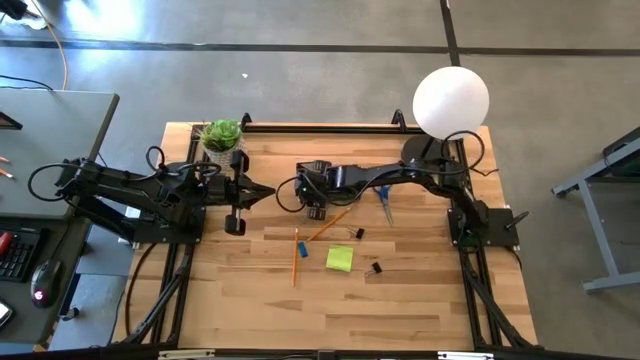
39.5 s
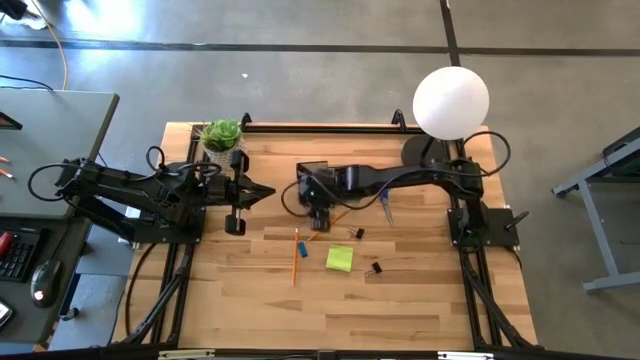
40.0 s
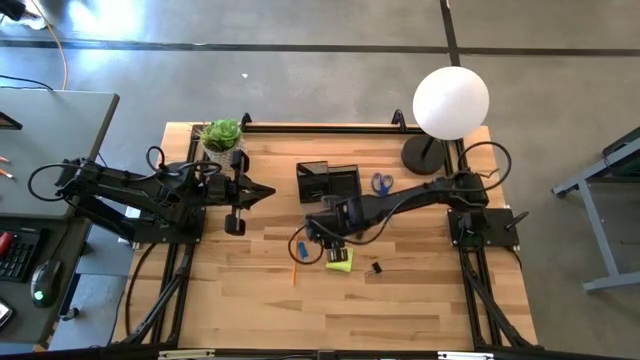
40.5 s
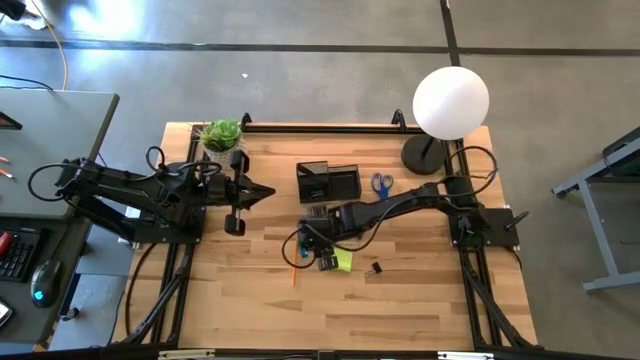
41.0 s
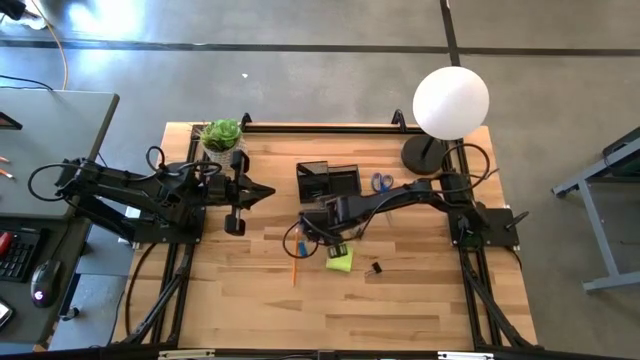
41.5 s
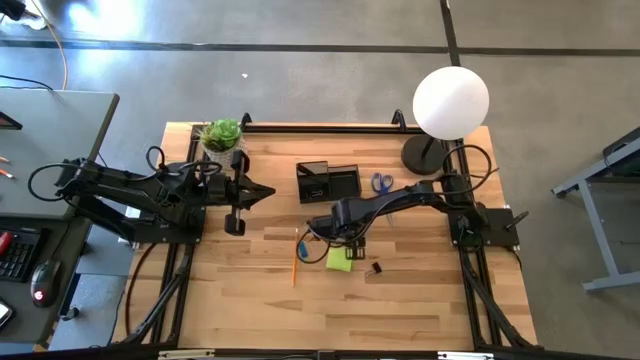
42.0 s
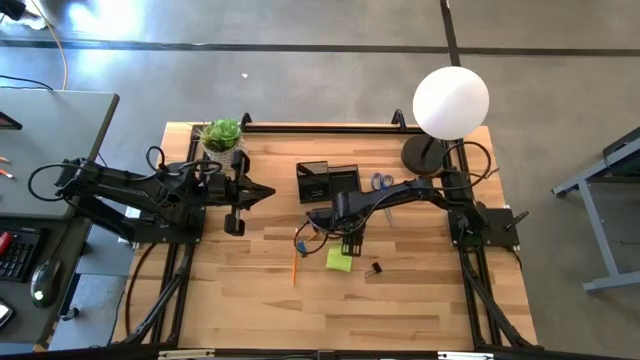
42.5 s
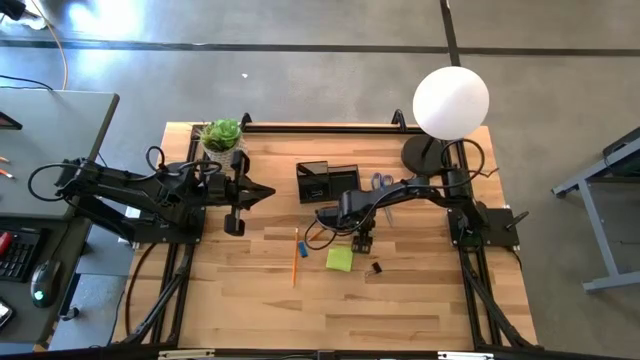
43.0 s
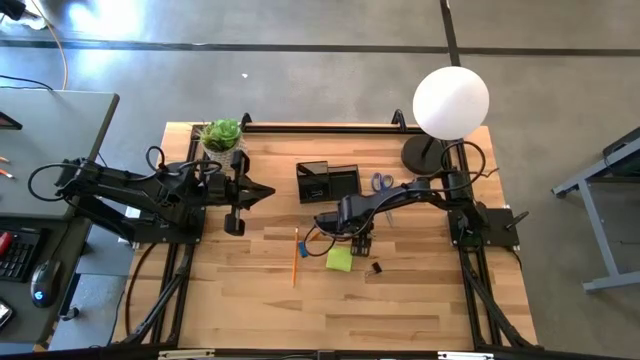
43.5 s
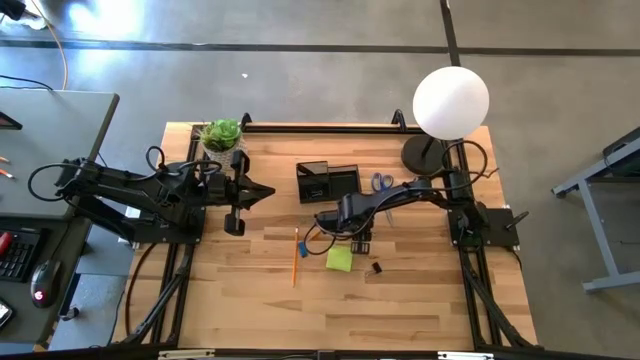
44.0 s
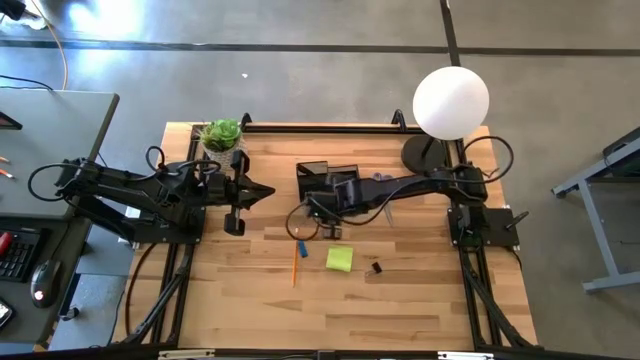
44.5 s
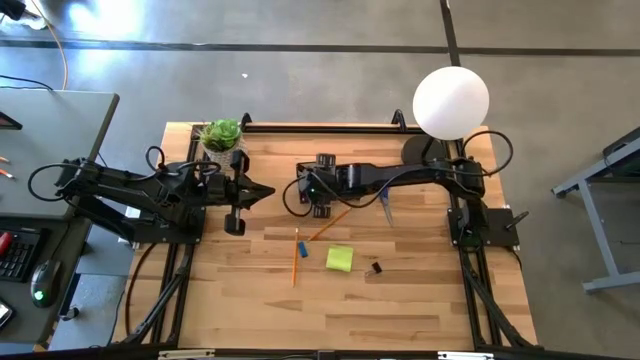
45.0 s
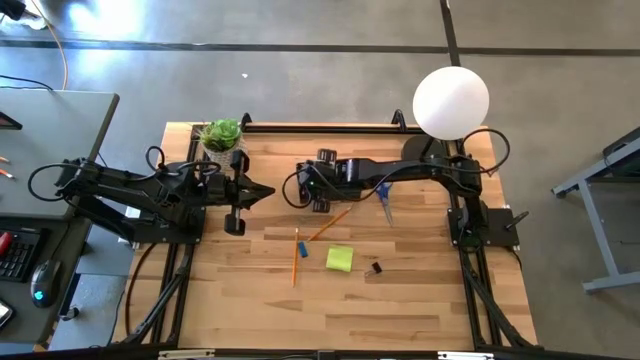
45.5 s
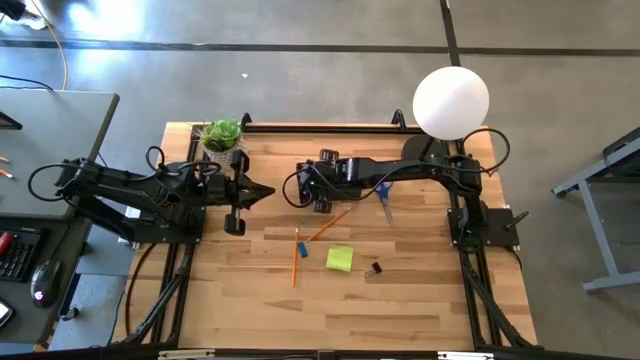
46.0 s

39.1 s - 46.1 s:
Task: Pick and place office supplies into organizer
Put the black binder clip into the black desk organizer

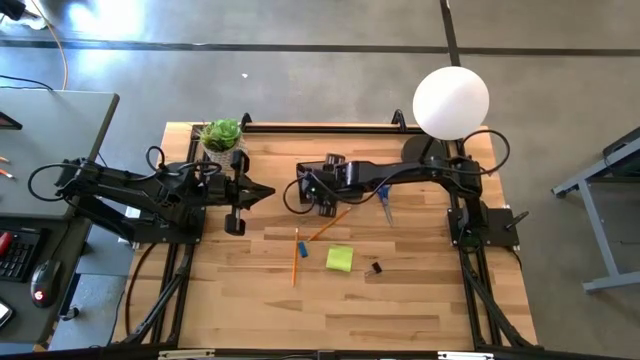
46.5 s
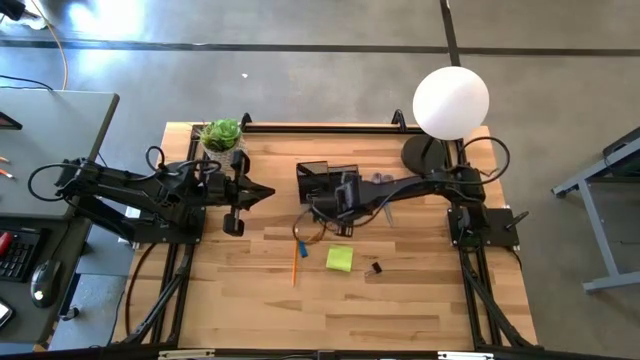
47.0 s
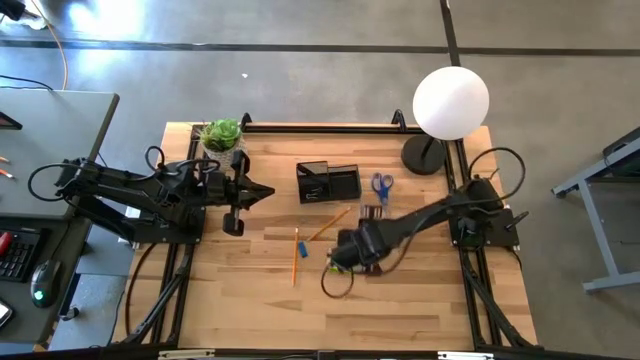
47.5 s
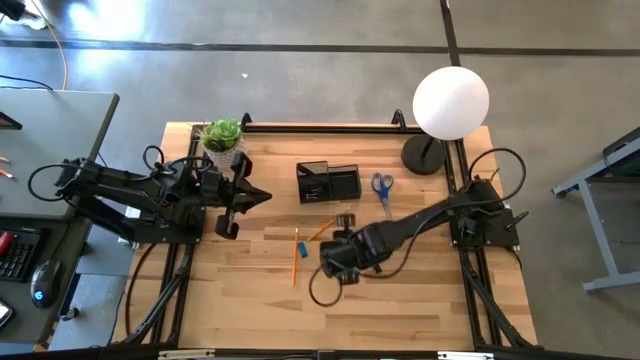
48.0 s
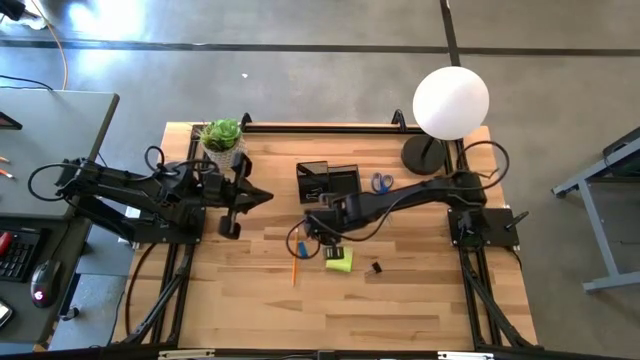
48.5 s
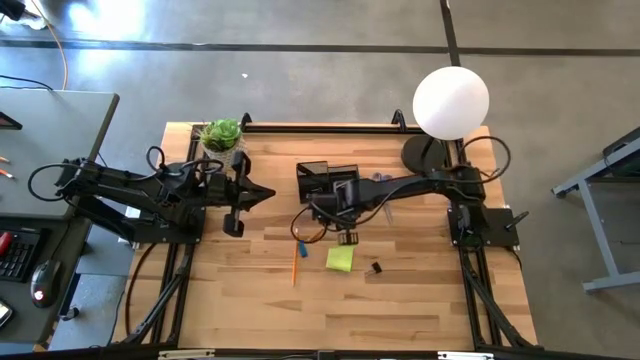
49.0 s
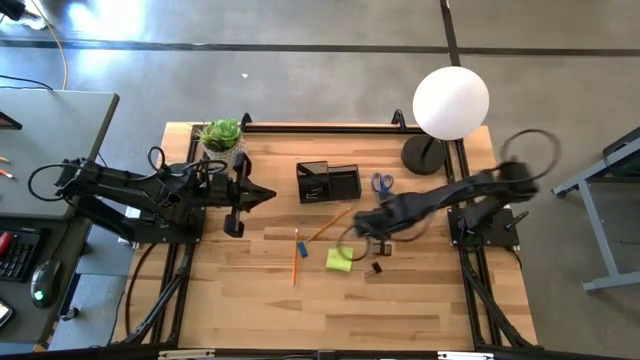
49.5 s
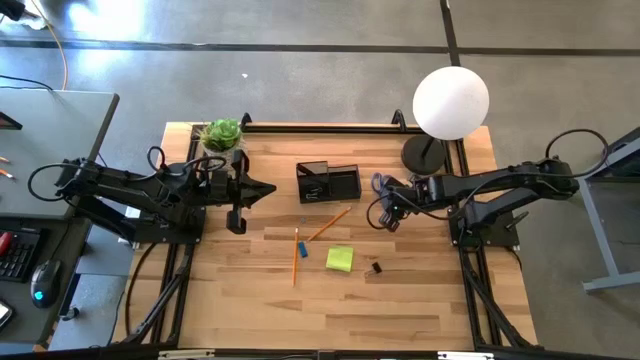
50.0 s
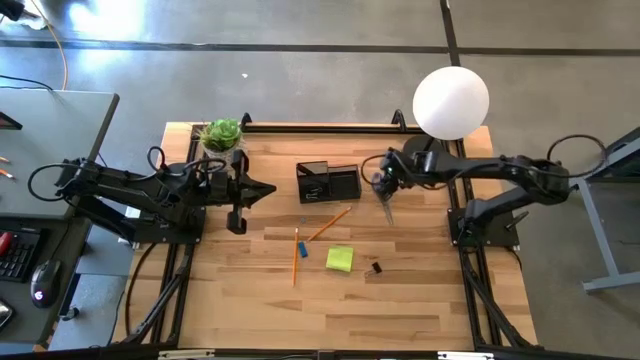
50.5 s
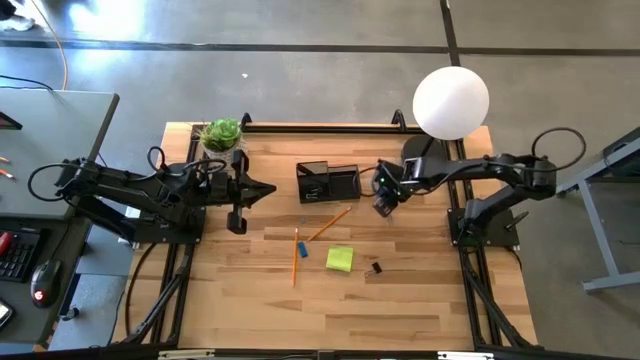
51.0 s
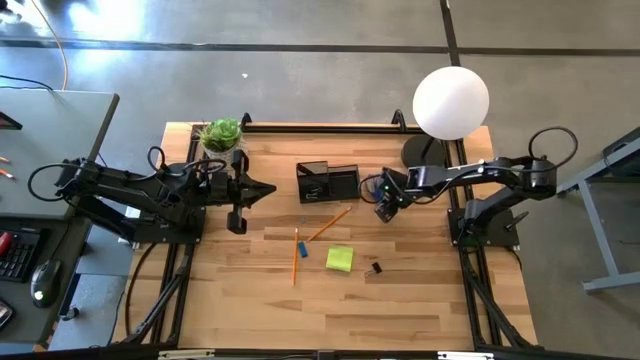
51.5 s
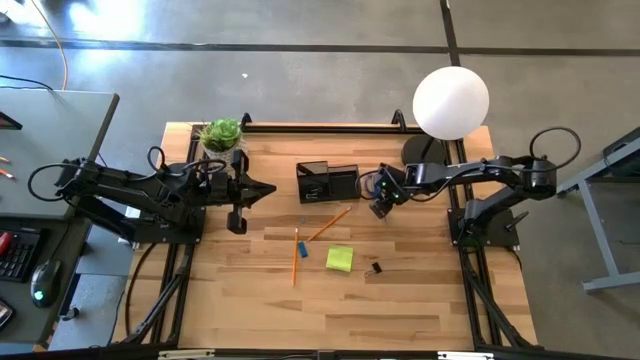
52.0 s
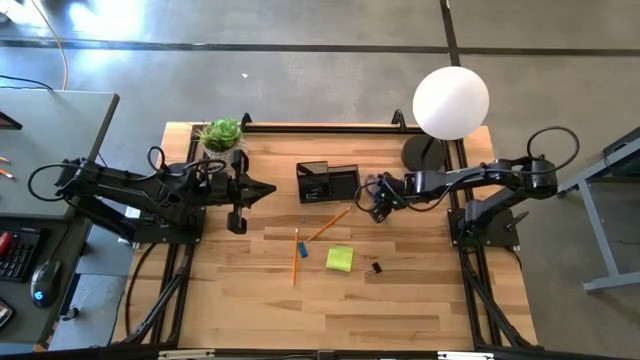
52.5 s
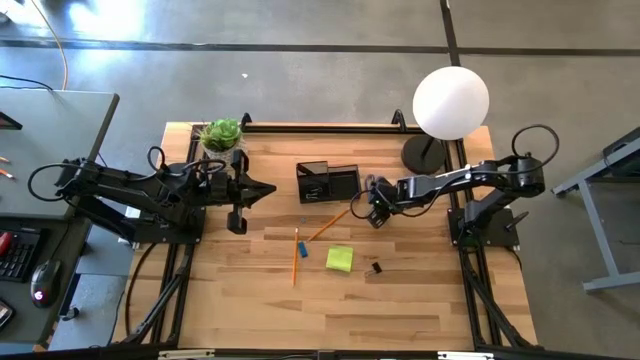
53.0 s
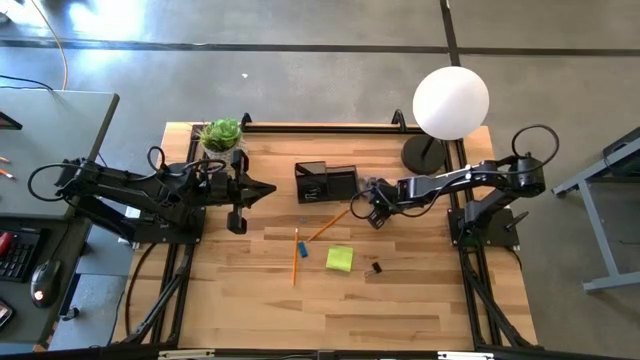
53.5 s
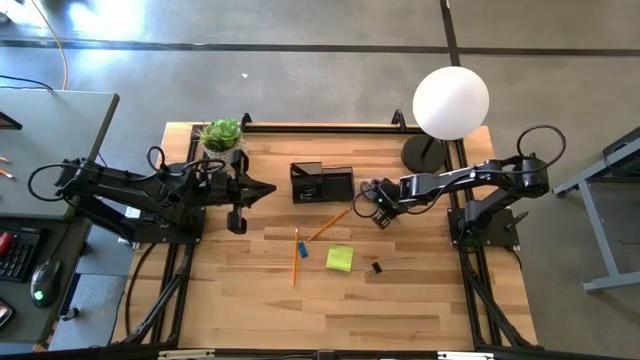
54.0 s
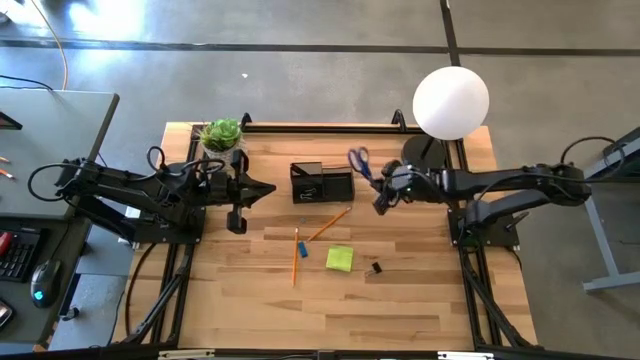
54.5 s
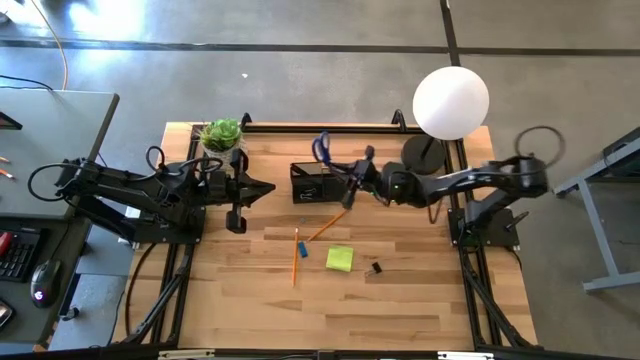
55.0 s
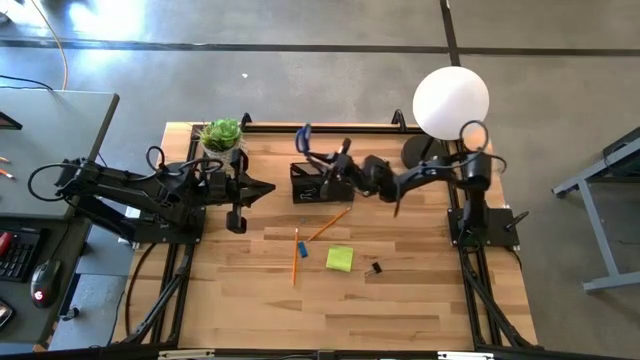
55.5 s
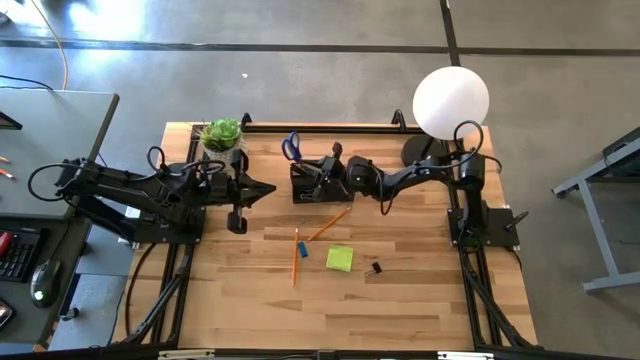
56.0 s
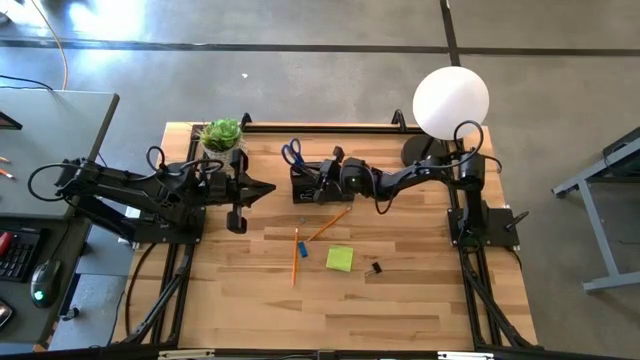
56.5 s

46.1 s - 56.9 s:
Put the blue scissors into the black desk organizer

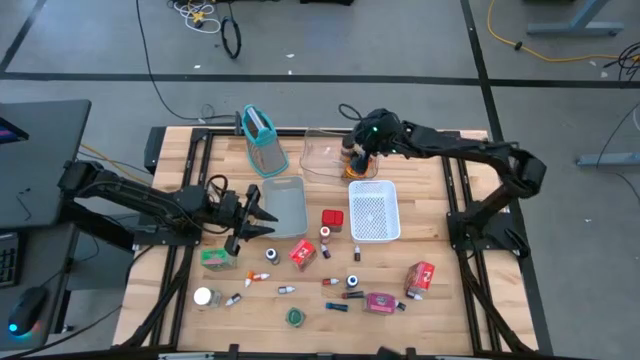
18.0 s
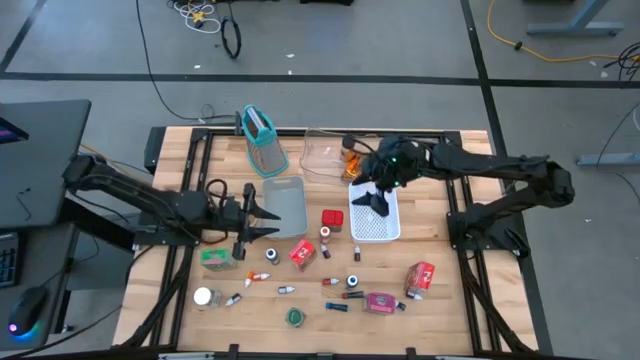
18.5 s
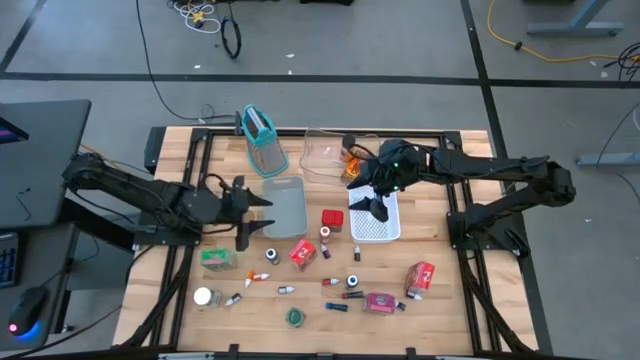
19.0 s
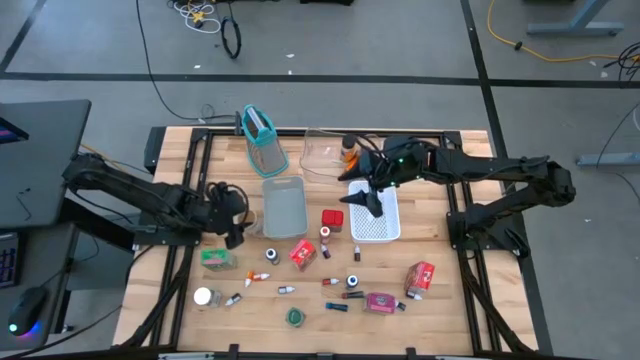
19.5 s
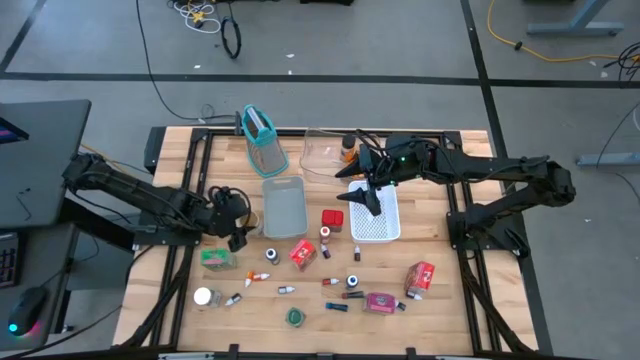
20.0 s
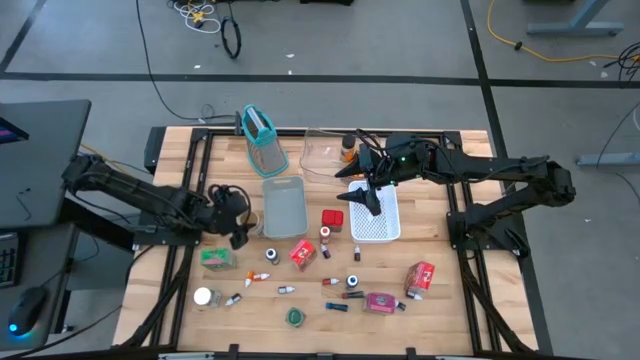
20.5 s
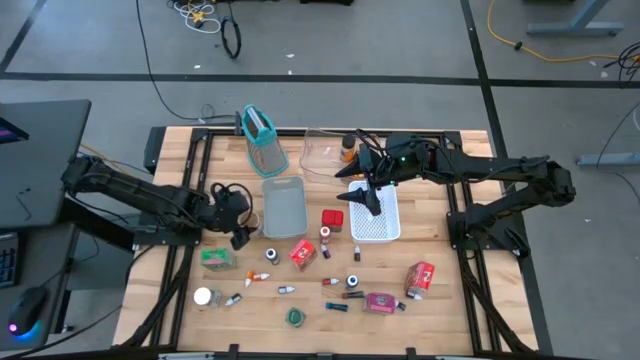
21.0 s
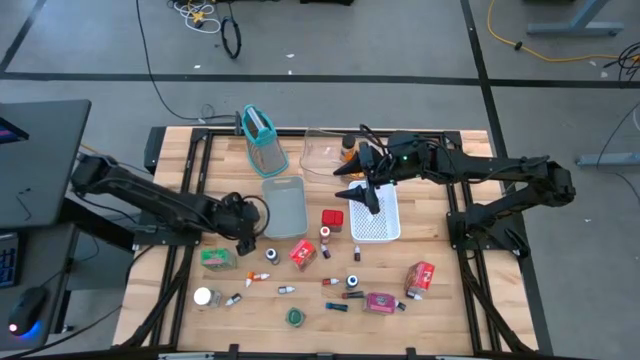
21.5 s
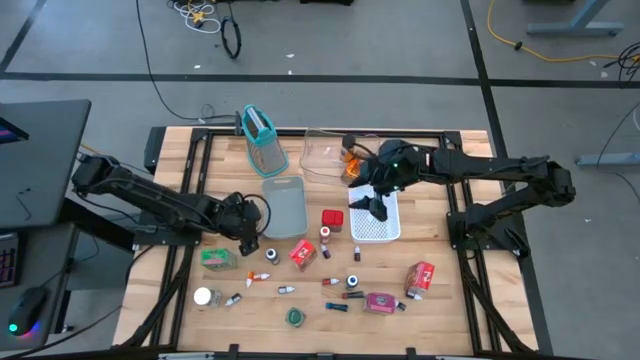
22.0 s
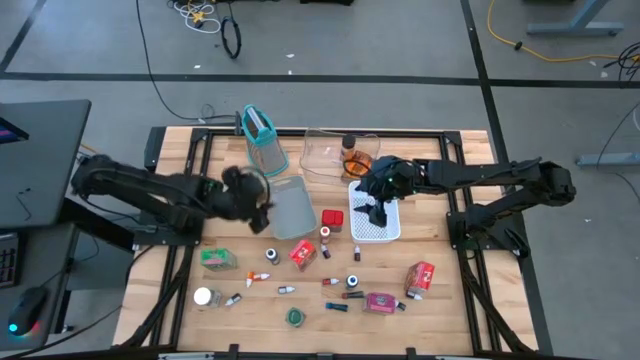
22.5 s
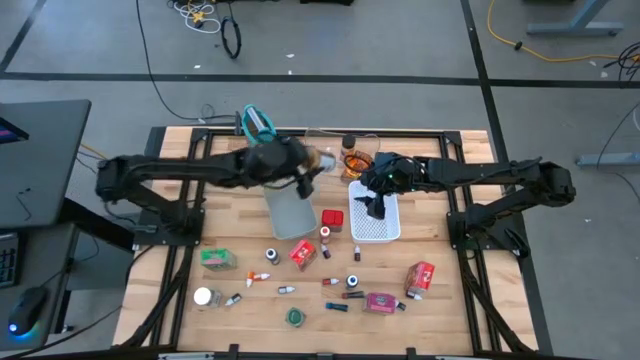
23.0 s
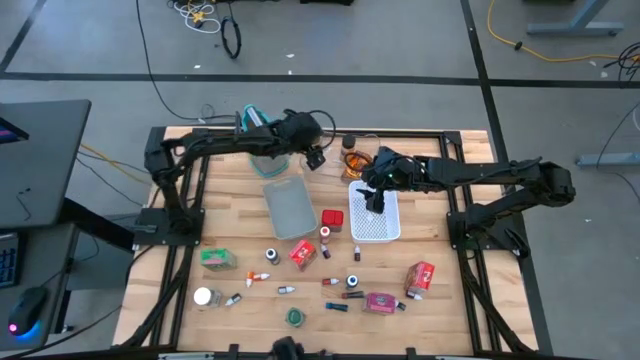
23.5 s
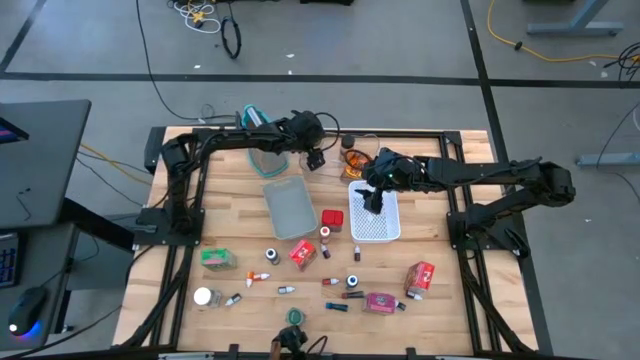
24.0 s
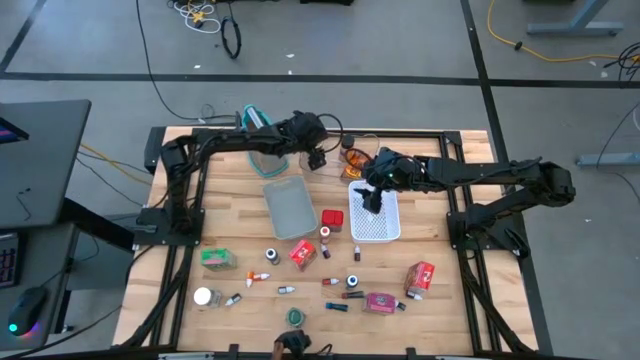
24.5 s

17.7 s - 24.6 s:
Task: Pick & Place Kitchen Items
Put the gold seasoning bottle into the transparent bin
